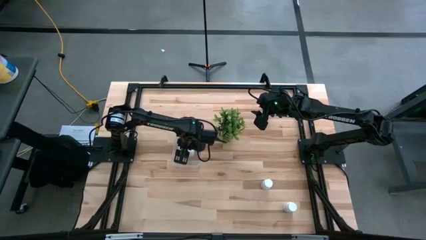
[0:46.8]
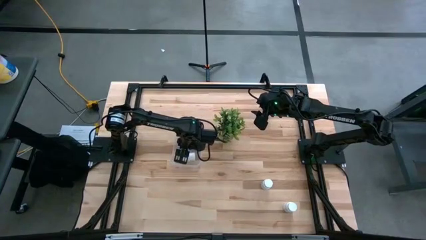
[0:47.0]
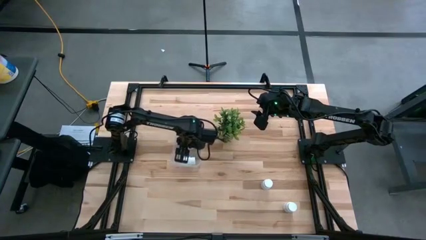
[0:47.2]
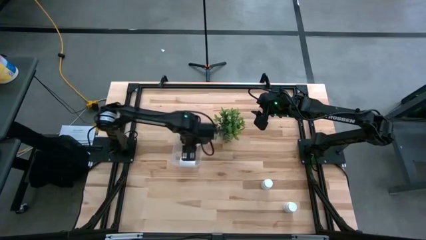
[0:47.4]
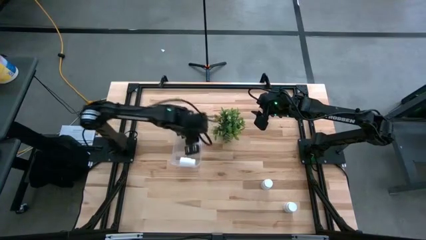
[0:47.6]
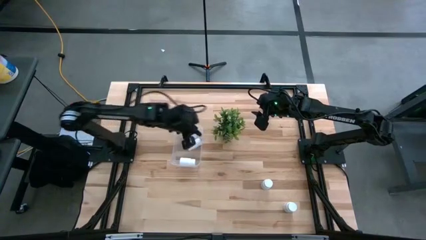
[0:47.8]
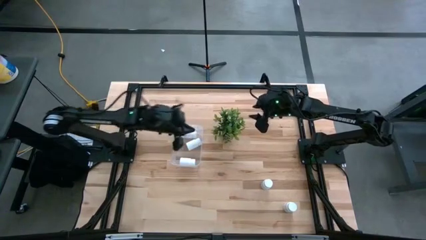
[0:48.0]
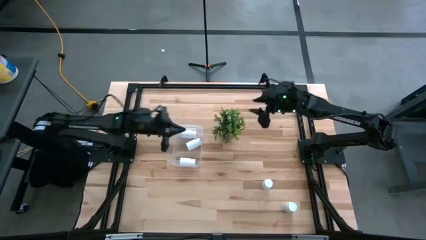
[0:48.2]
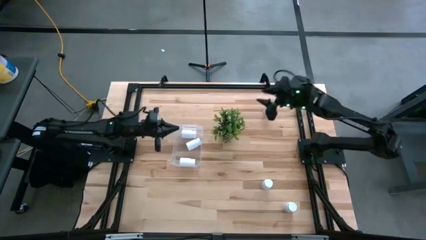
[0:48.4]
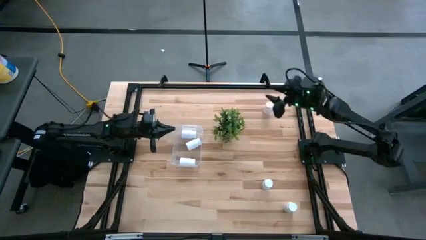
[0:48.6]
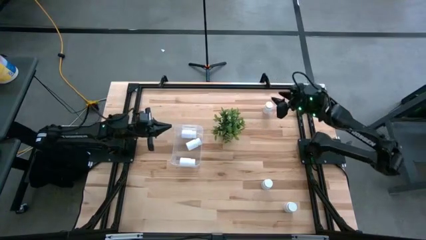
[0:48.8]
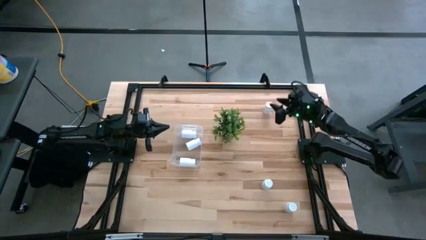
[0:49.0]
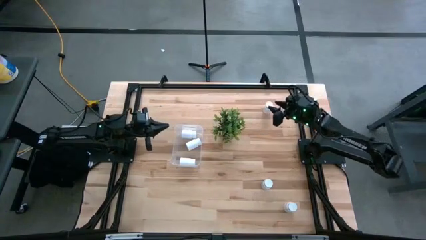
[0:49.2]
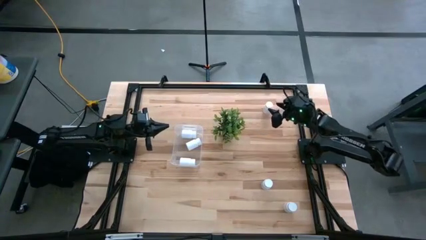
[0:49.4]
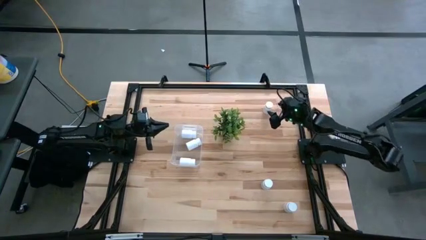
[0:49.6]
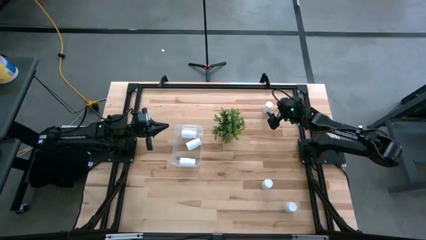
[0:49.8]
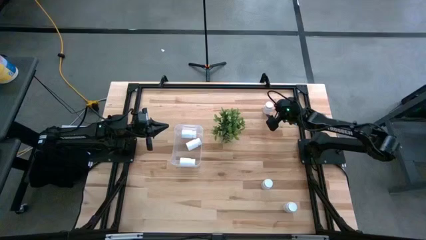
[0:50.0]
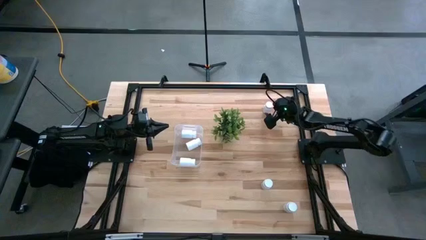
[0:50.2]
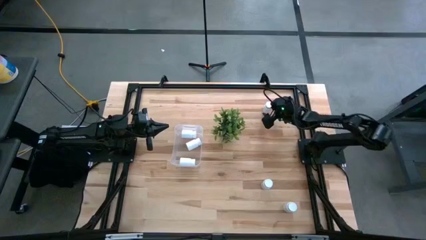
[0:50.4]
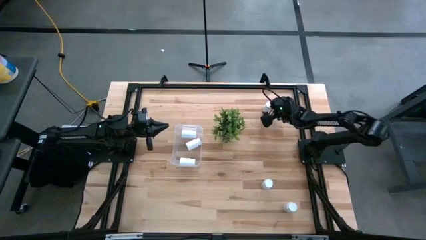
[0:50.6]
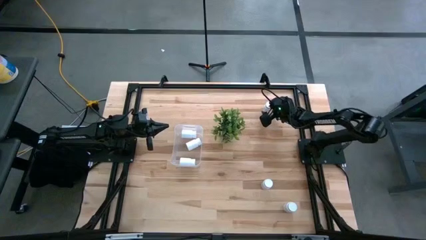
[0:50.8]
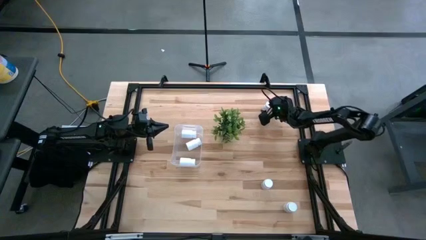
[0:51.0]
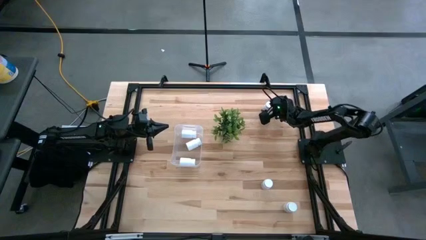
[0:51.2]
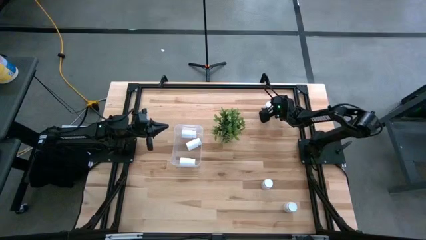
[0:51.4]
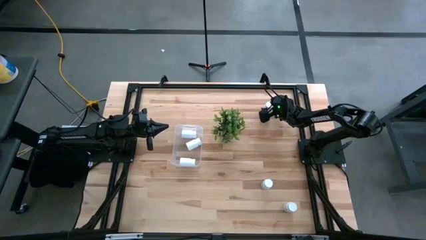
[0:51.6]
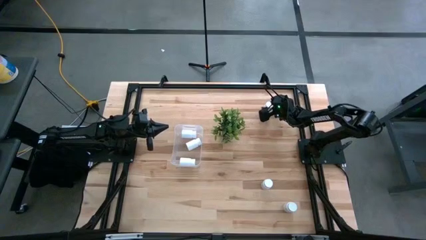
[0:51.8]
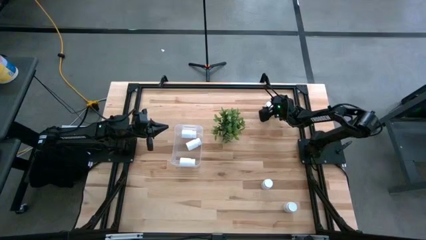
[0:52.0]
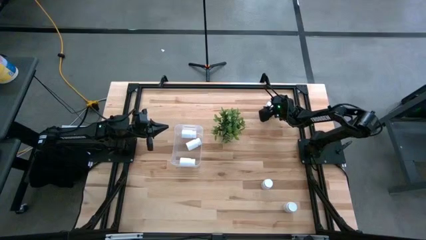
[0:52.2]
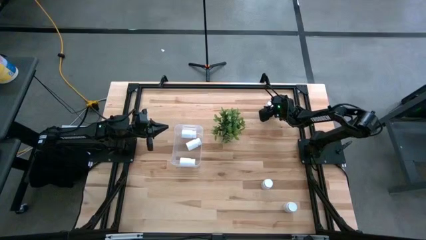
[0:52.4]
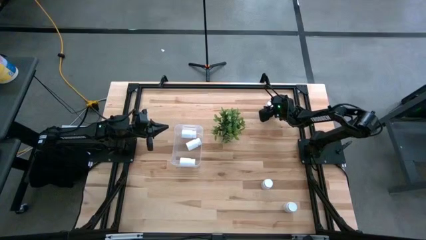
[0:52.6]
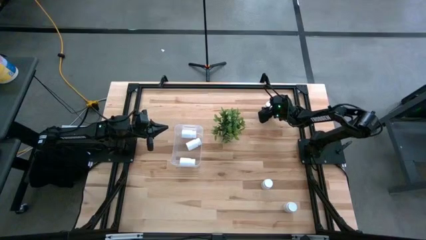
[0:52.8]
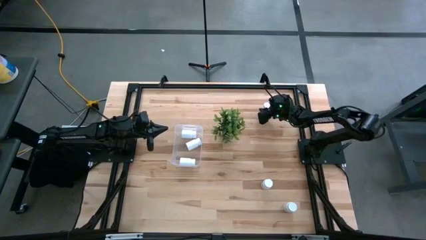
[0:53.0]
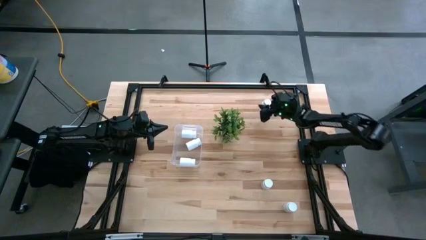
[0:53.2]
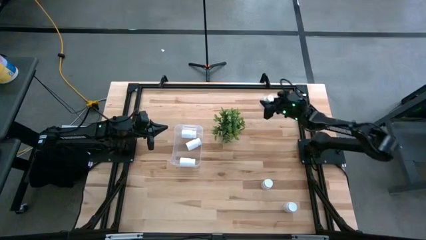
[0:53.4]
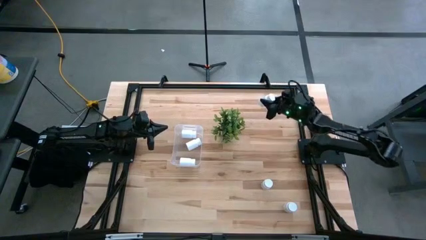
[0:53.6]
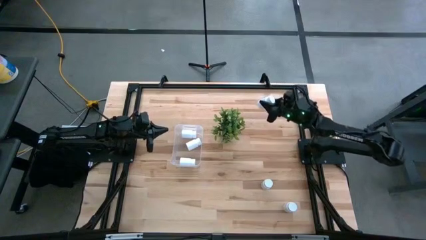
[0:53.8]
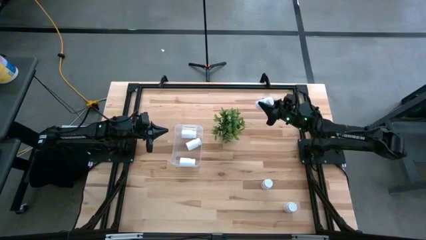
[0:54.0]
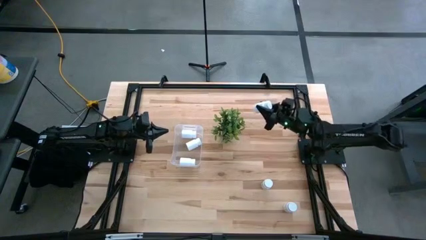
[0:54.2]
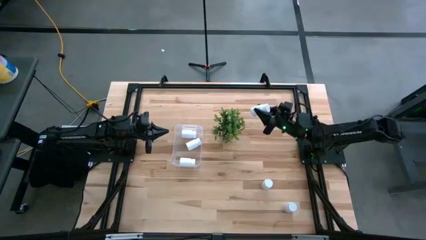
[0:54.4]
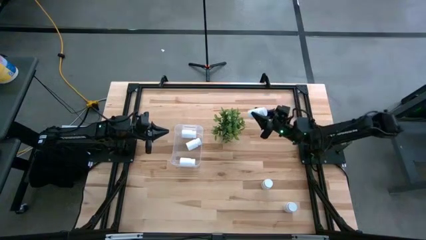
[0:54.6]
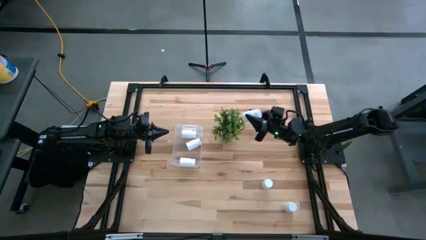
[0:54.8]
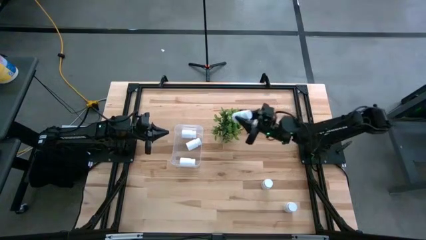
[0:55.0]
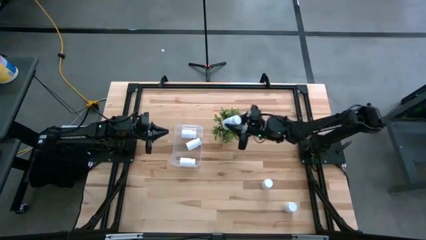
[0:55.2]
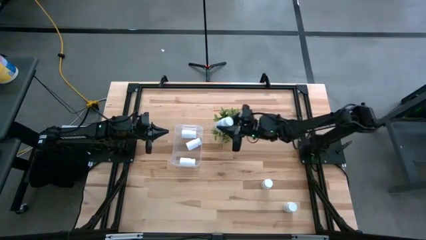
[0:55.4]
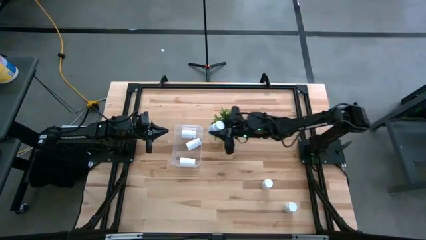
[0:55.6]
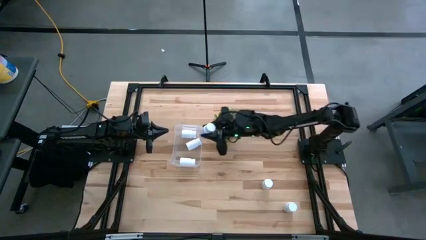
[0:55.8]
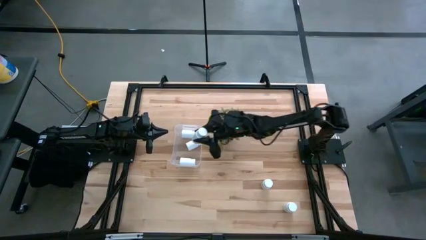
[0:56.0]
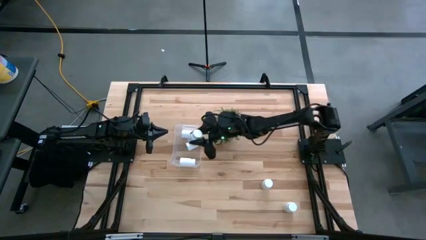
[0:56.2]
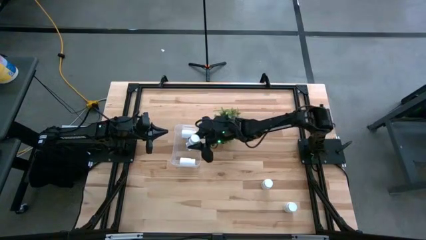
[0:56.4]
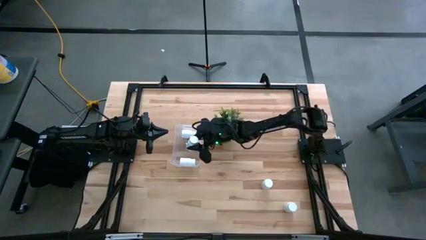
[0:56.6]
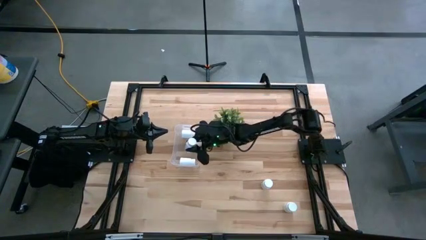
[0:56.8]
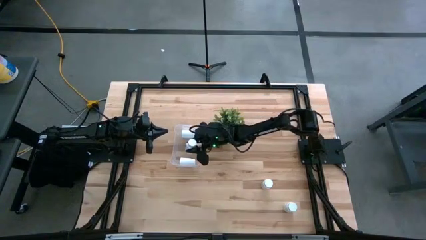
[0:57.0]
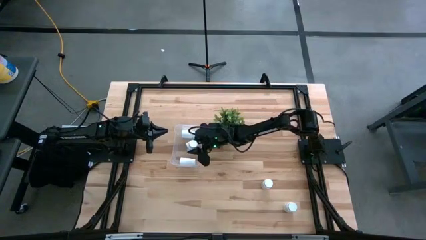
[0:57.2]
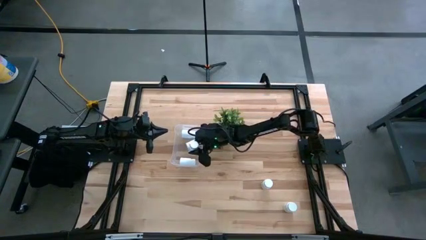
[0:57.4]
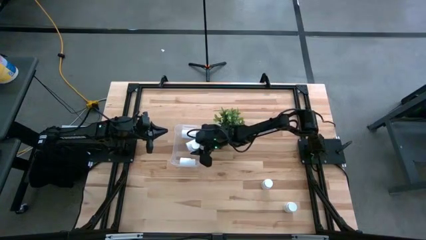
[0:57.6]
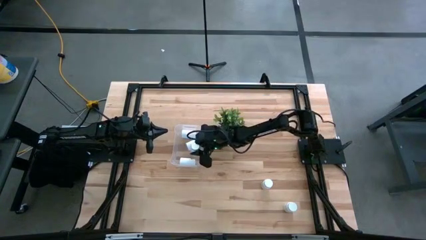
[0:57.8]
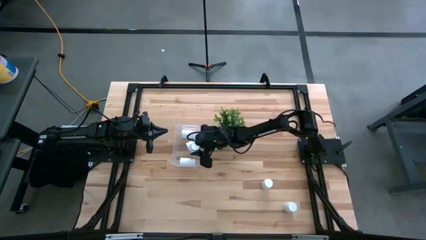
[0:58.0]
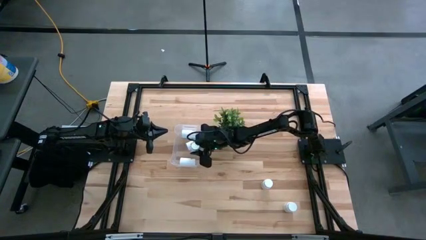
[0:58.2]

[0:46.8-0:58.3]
Task: Pick and place pill bottles into a basket
Put the white pill bottle into the transparent bin
